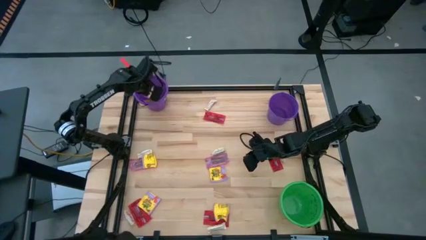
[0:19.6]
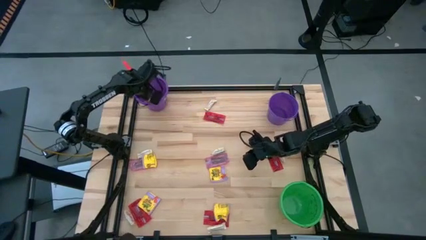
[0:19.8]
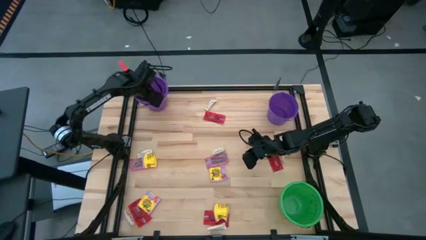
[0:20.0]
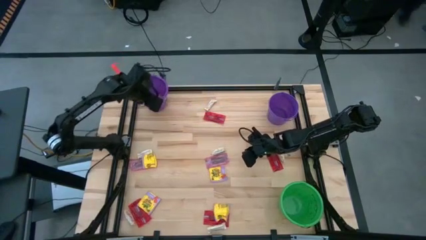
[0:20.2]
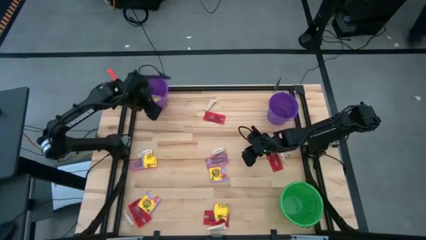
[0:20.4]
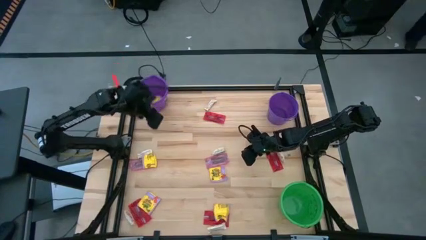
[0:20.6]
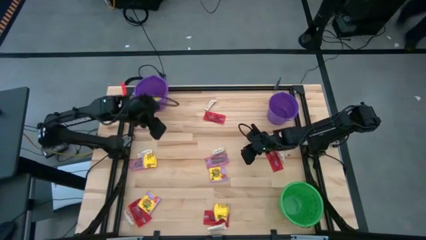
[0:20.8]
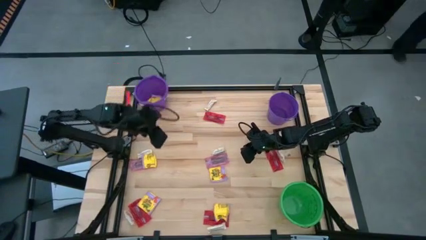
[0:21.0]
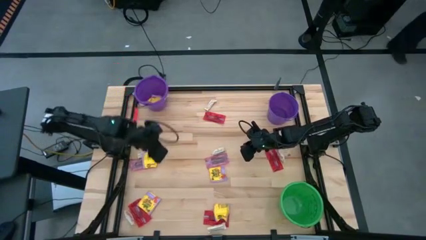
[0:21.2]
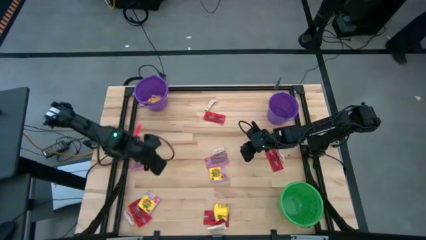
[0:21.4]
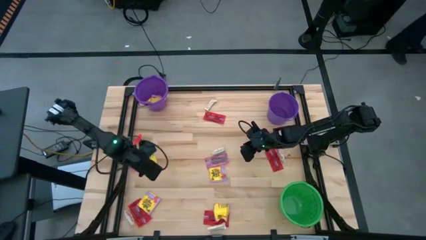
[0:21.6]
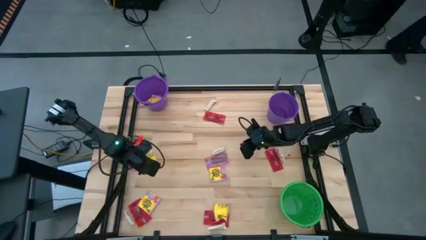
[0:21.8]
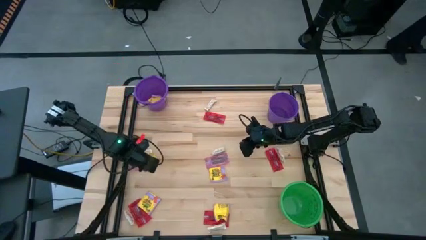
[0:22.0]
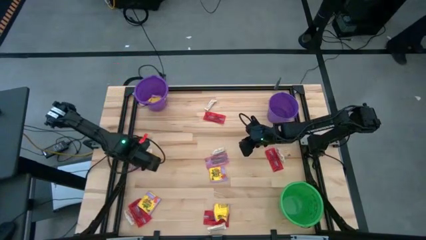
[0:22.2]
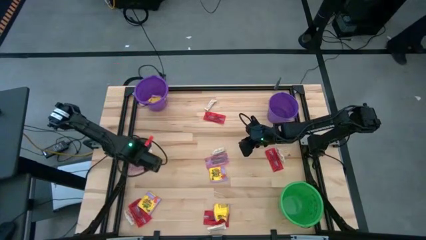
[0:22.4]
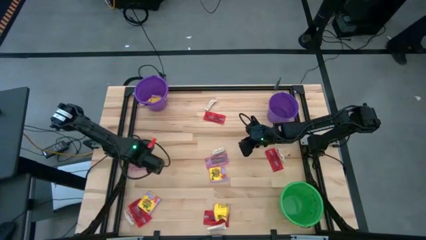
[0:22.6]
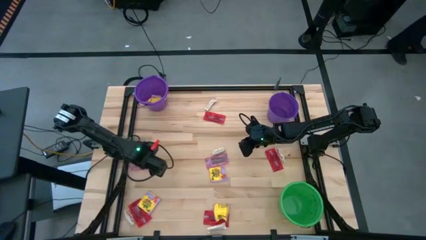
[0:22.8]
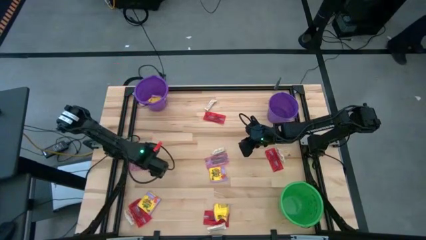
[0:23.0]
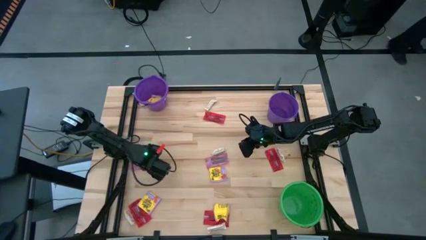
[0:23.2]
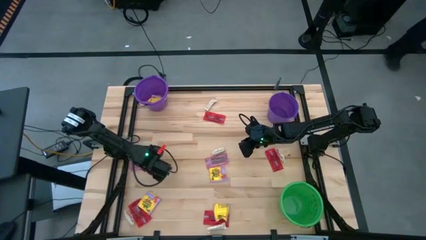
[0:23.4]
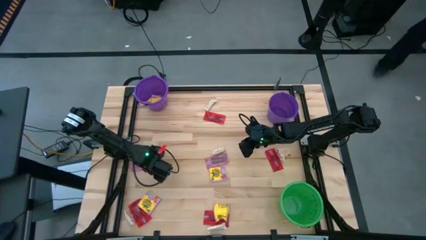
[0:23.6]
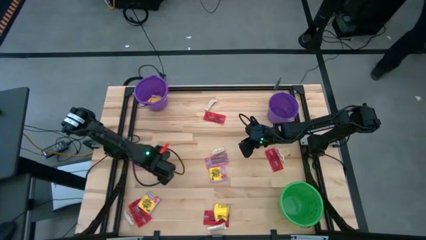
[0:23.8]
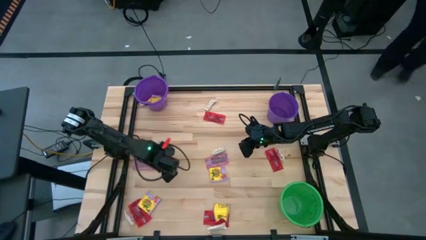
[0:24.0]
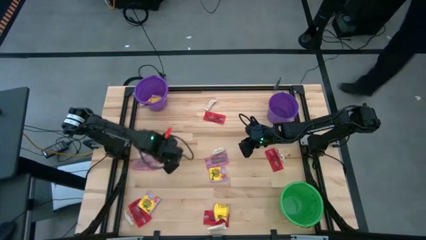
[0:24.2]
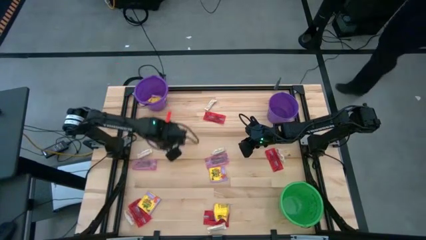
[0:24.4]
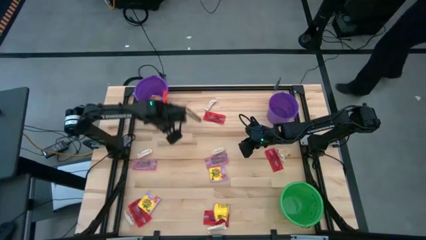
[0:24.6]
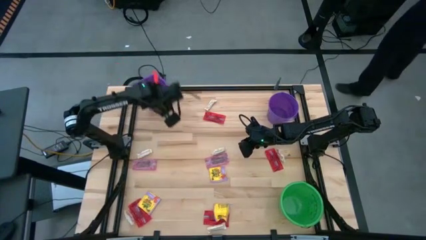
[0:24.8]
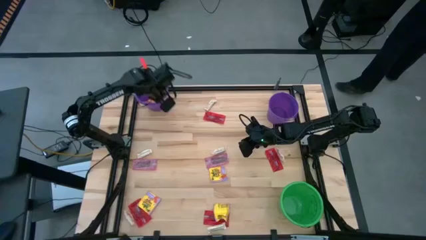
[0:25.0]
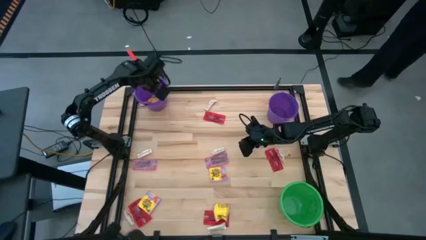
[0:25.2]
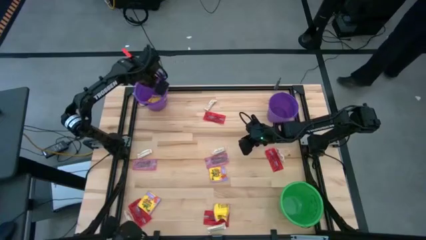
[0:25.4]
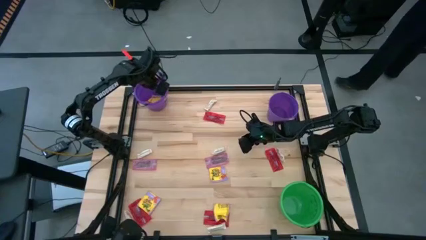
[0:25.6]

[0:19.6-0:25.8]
Task: Sort candy by brand, put in halloween buckets
Put the yellow candy into the left purple bucket

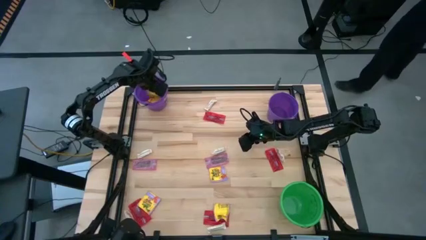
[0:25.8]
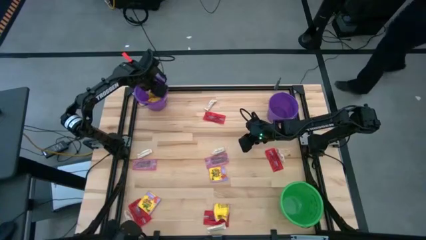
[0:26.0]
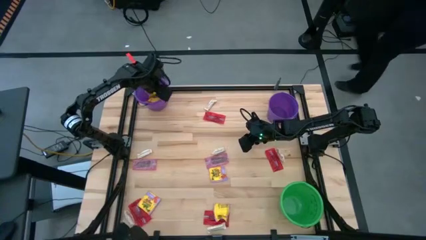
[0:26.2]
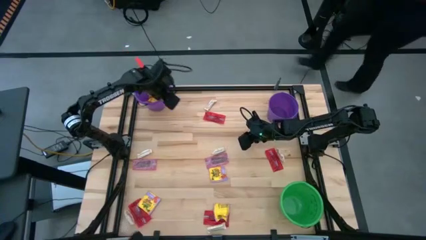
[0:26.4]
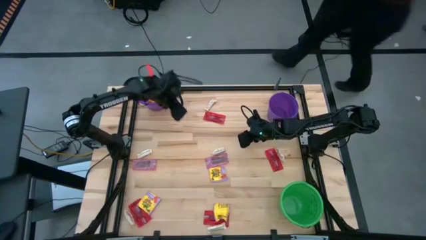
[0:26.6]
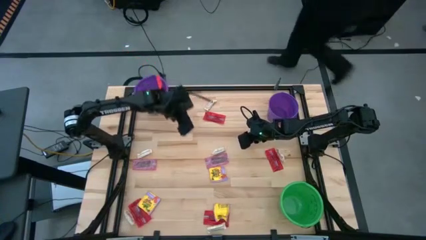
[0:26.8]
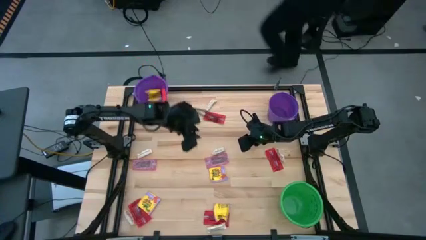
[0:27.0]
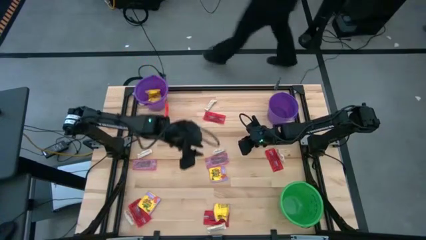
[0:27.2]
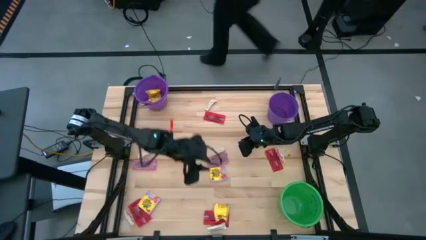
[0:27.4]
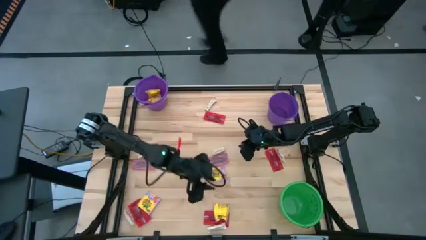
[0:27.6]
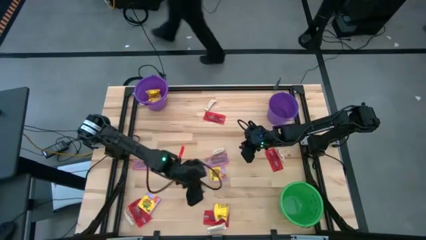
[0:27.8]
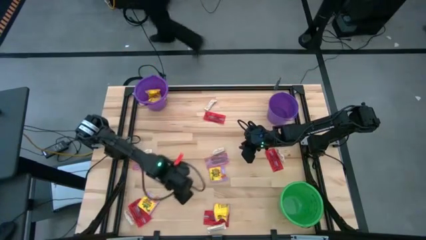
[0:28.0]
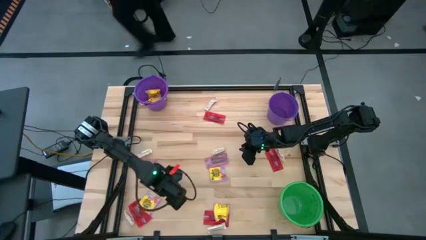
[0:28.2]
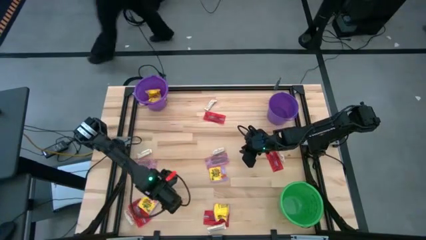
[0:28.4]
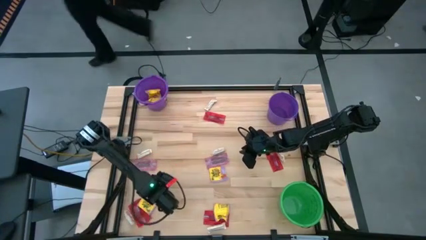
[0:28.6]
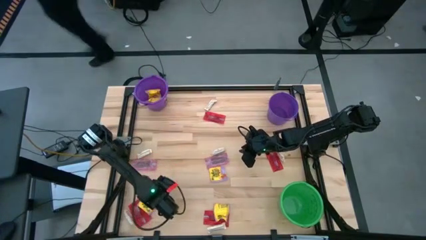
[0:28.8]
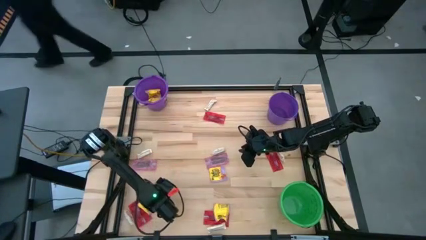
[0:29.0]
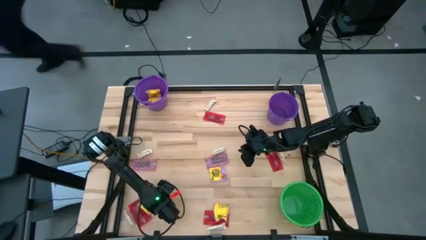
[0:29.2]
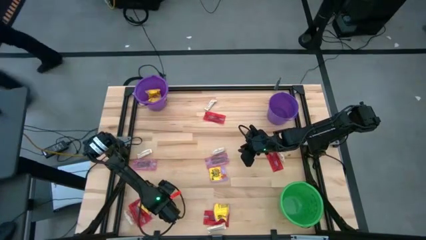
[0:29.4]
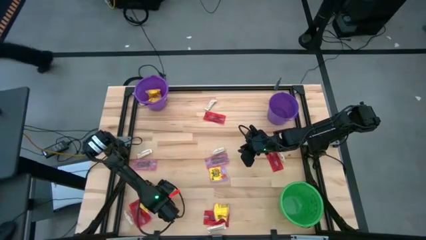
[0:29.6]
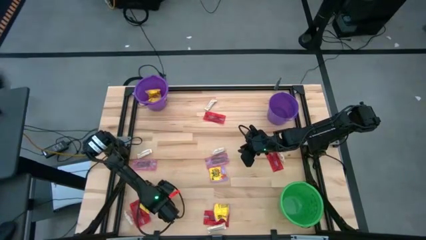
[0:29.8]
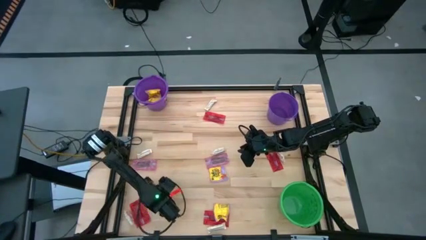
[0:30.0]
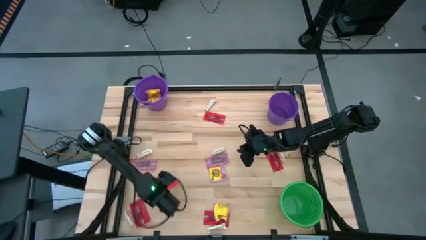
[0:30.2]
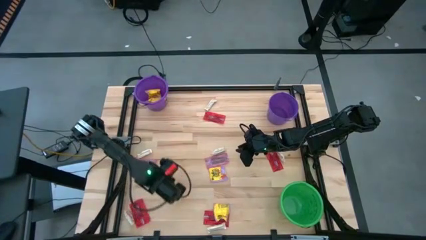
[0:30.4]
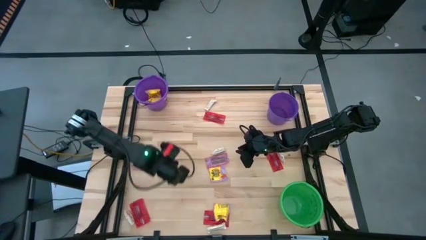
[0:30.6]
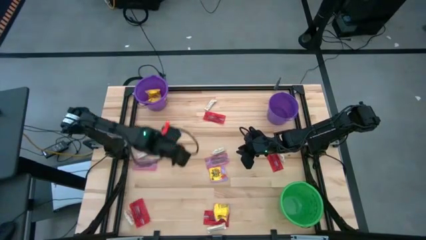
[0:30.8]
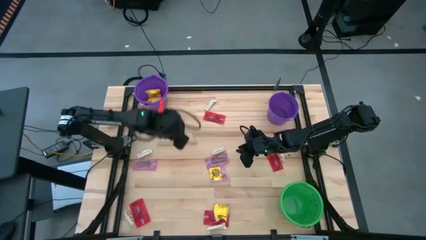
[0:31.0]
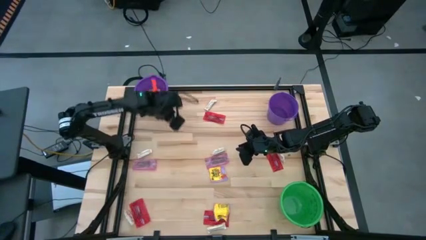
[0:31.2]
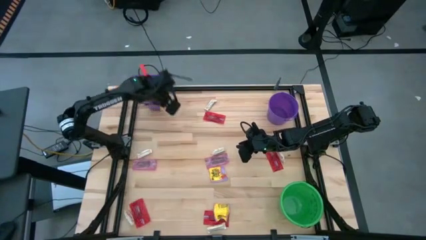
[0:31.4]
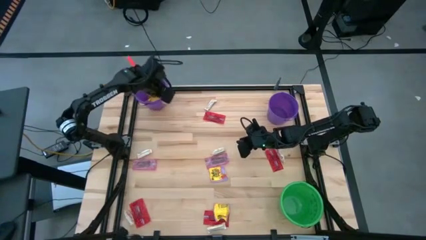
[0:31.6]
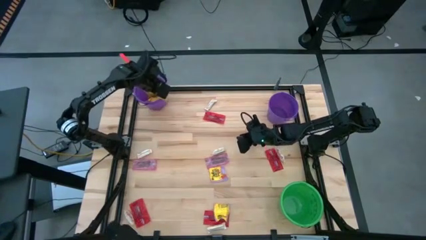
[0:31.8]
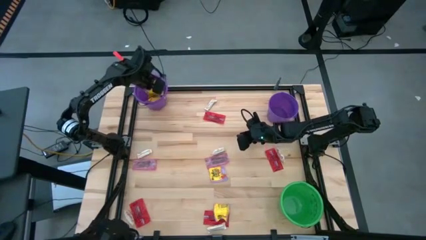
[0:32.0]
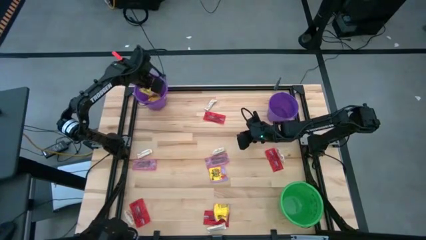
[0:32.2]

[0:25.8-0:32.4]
Put the yellow candy into the left purple bucket

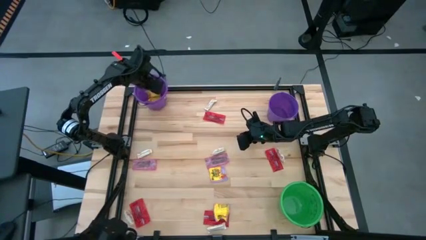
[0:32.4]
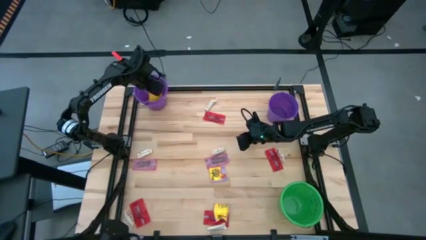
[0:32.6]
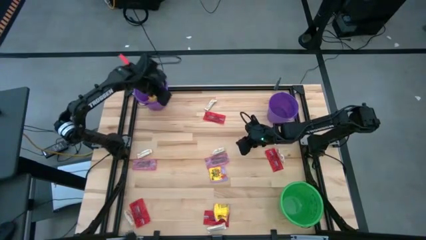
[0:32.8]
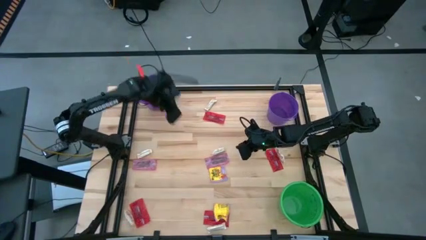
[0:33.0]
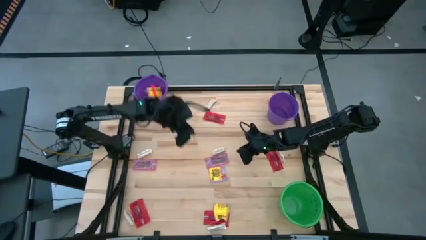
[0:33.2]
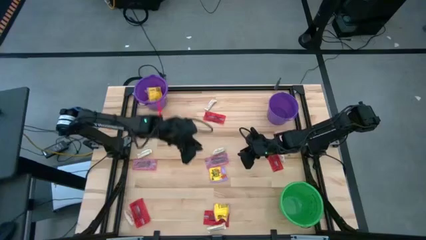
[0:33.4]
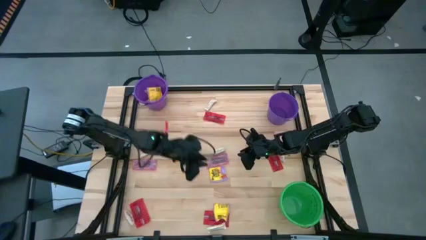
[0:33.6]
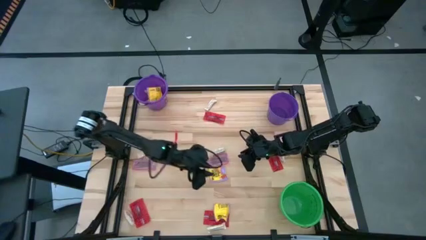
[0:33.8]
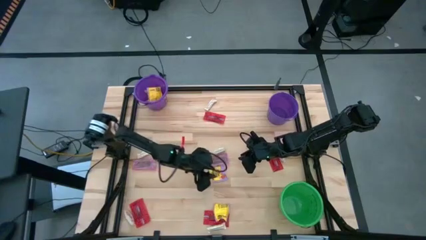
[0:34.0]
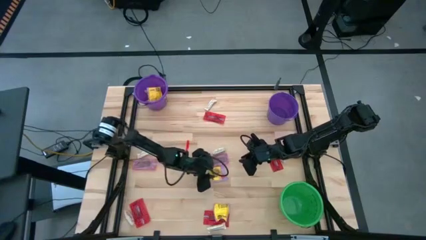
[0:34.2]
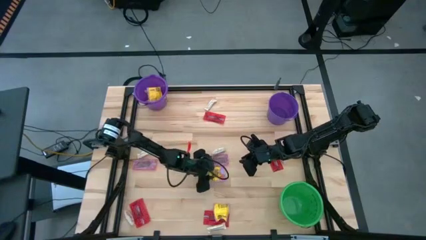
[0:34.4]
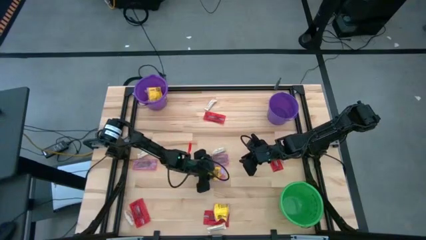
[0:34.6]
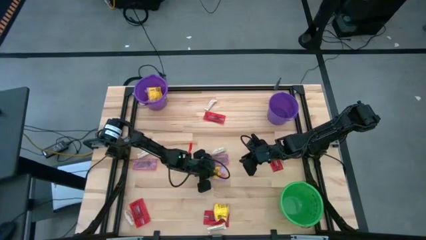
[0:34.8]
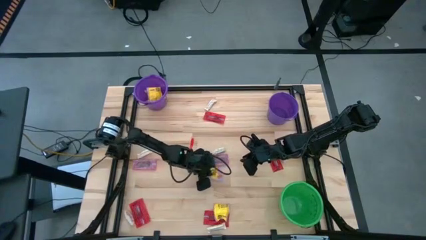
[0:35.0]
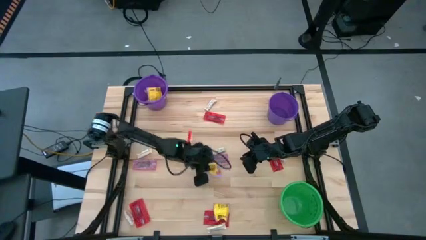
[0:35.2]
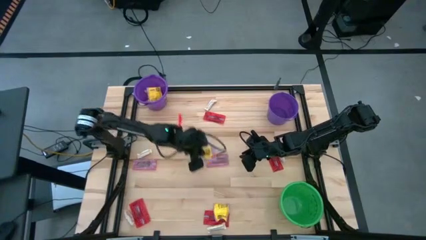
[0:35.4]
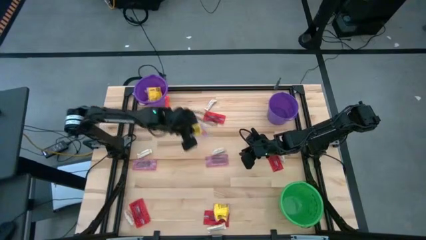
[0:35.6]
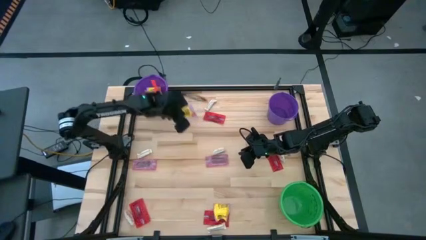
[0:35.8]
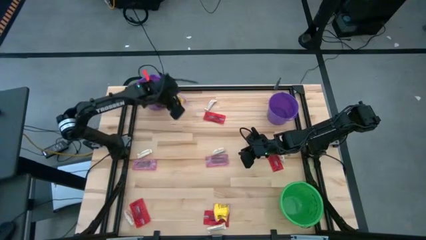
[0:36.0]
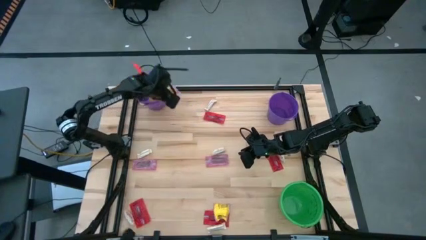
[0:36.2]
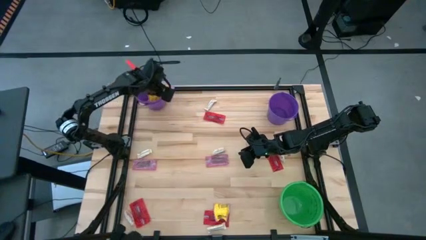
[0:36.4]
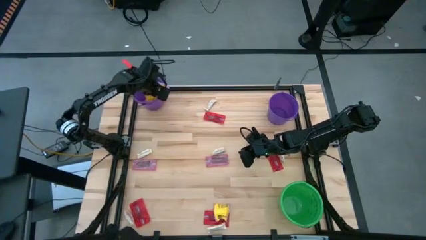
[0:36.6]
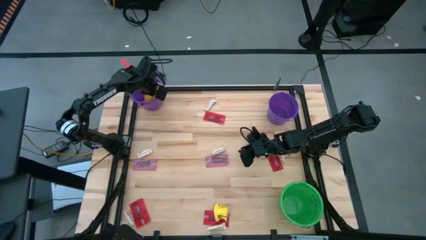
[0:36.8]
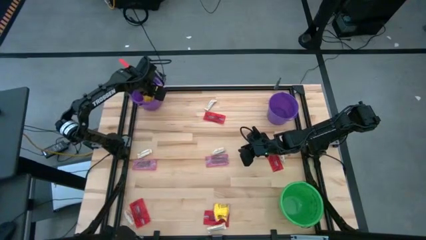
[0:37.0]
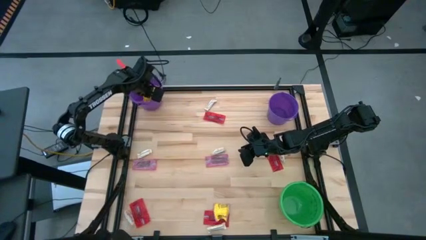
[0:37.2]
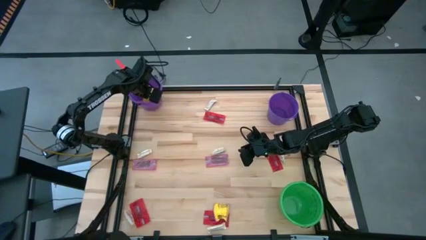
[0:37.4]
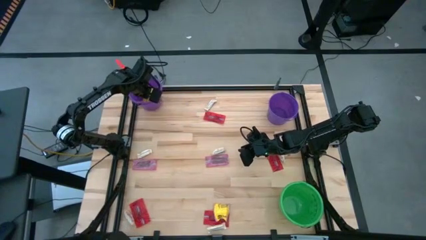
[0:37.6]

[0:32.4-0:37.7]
Put the yellow candy into the left purple bucket
